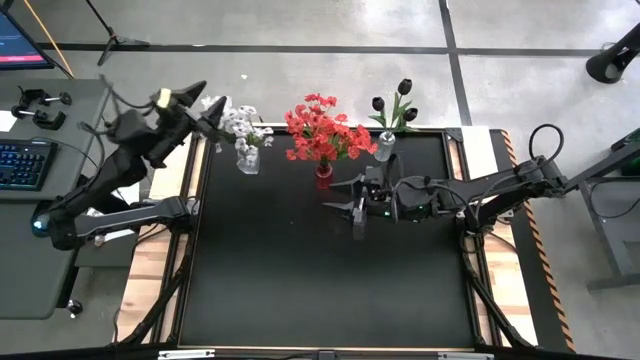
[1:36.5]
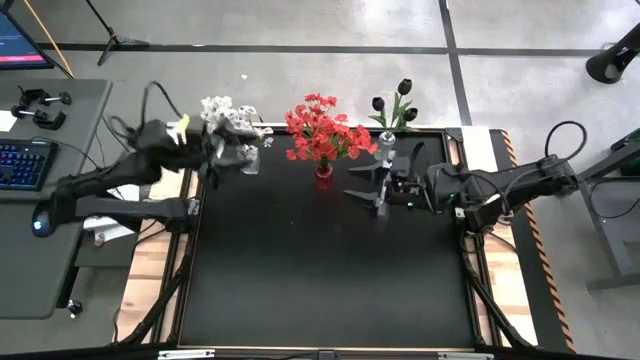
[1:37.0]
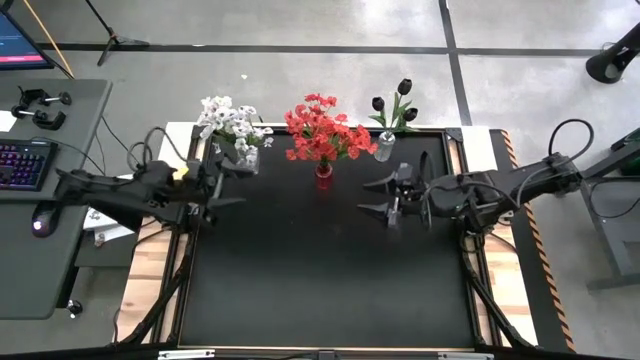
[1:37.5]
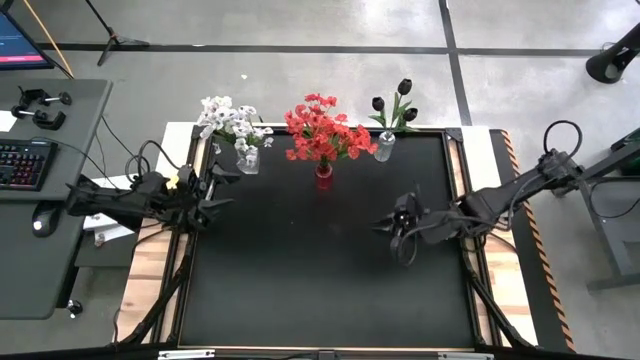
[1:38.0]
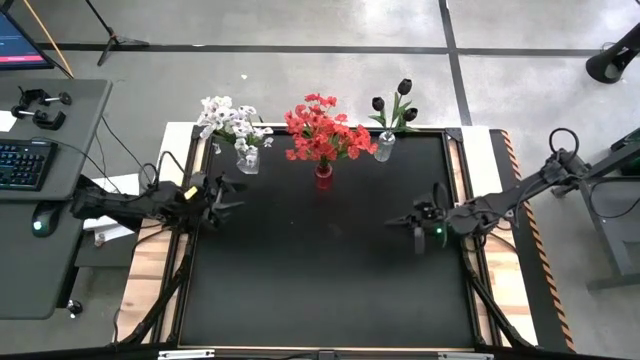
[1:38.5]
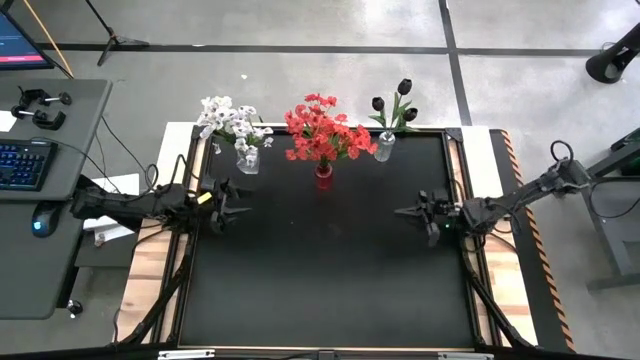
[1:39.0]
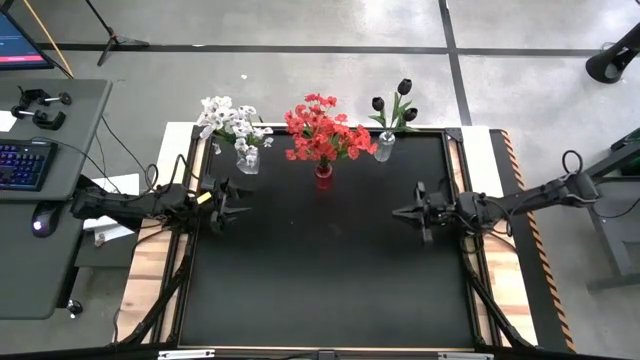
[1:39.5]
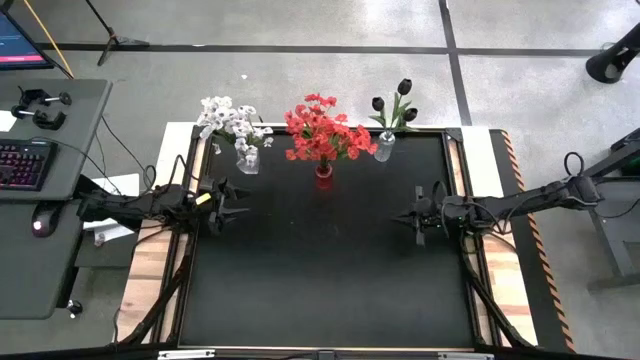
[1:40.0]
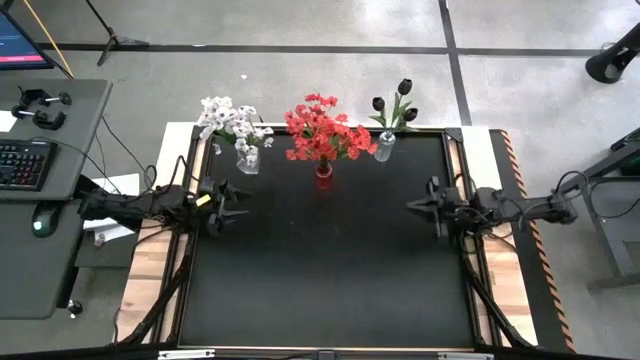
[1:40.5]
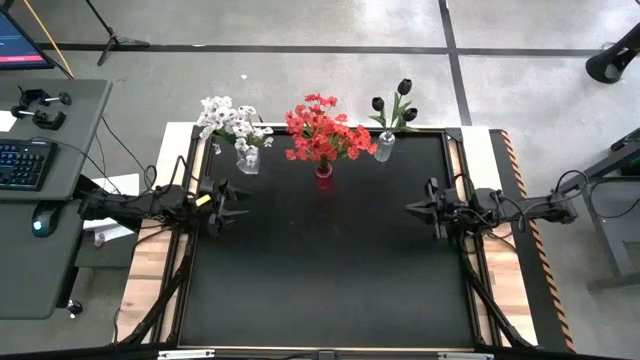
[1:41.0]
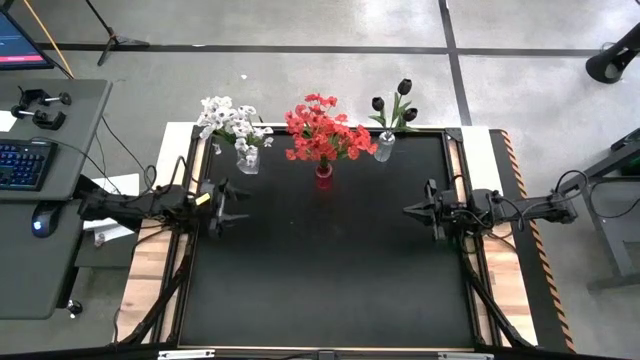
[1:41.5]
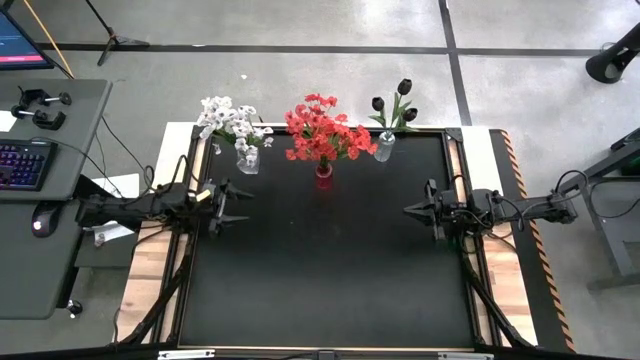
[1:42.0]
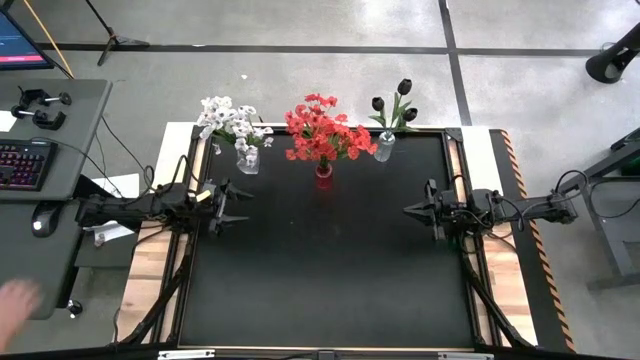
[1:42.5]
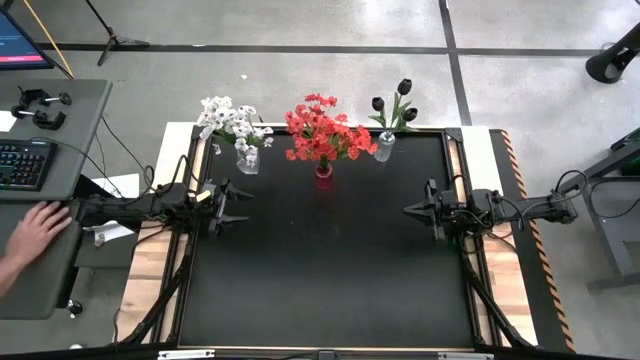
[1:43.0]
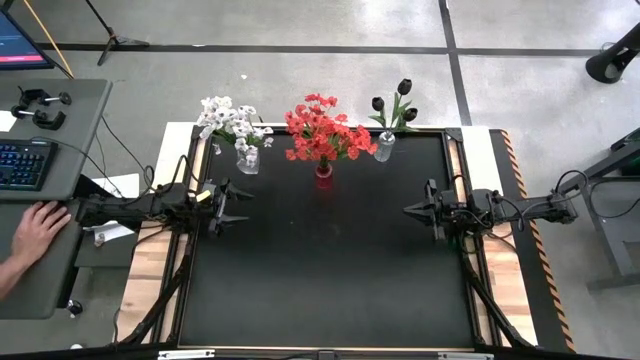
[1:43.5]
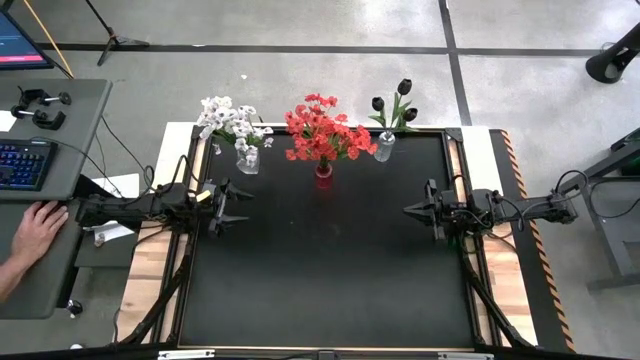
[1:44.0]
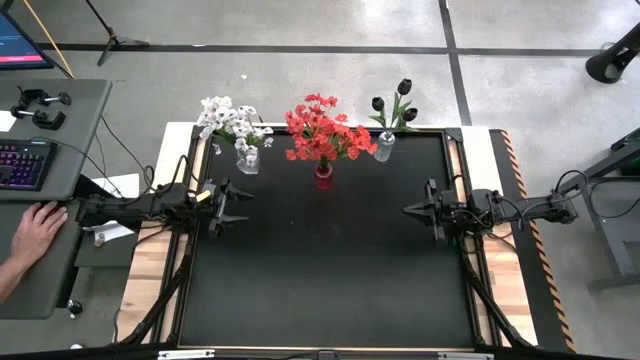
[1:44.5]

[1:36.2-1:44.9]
Task: Sort flowers into vase by color
Return to Home Position

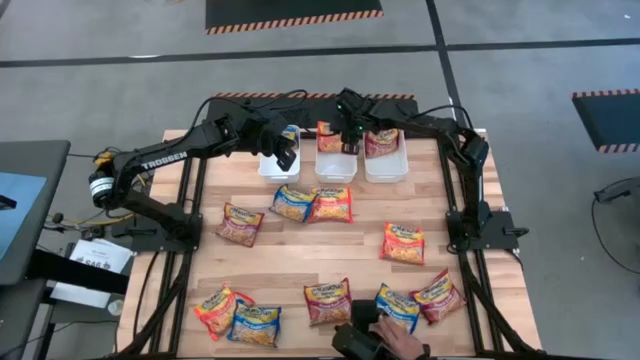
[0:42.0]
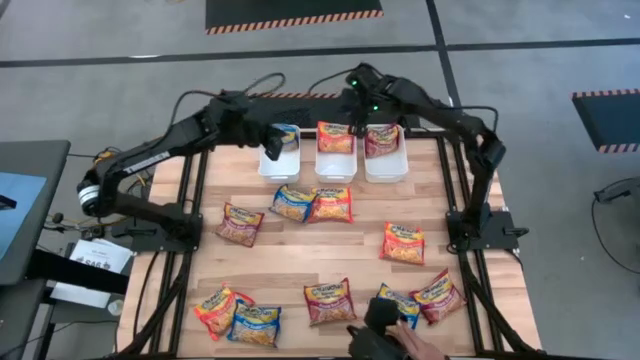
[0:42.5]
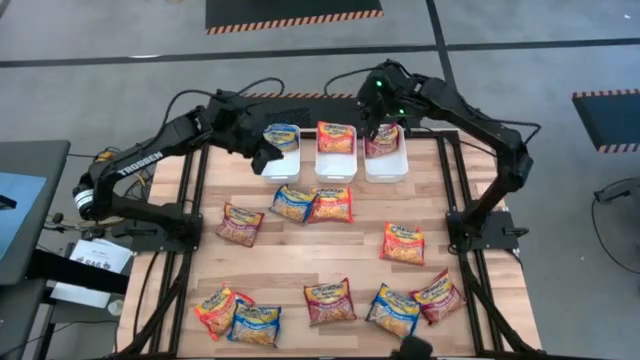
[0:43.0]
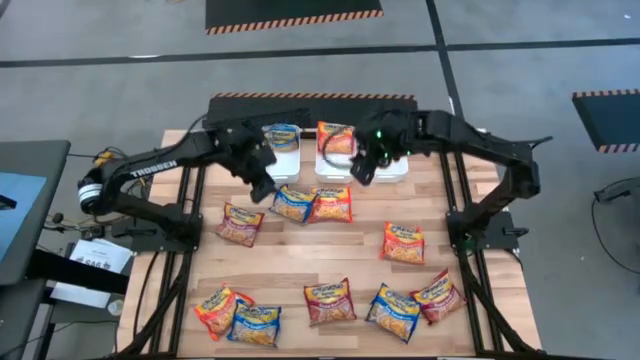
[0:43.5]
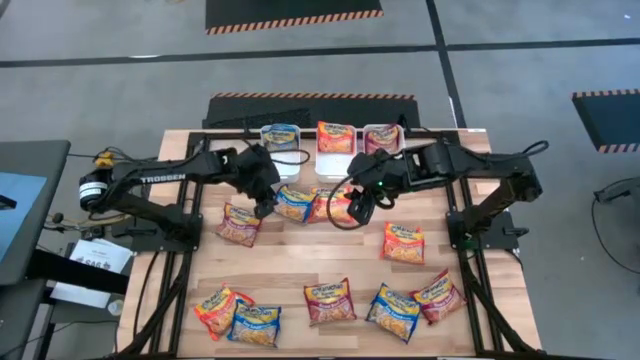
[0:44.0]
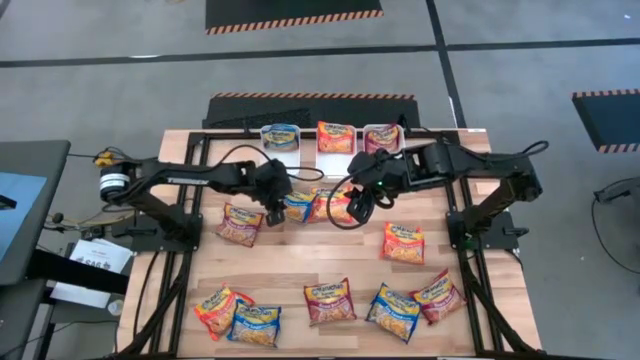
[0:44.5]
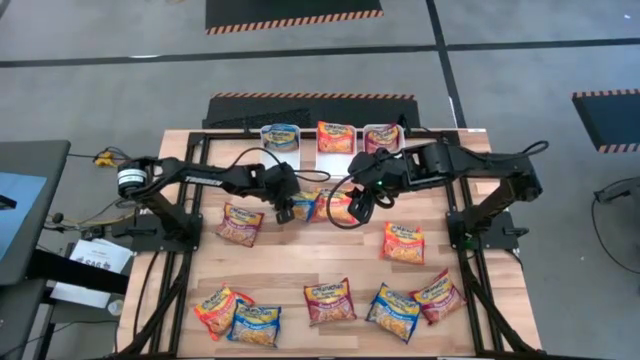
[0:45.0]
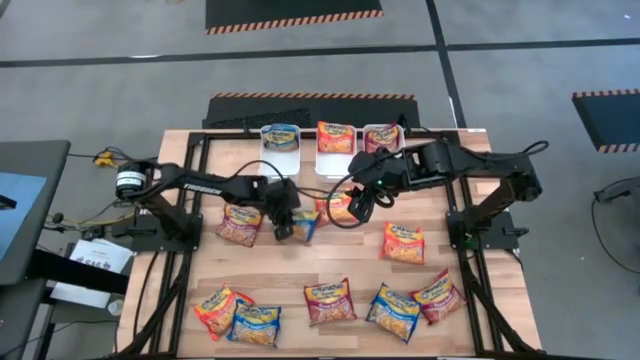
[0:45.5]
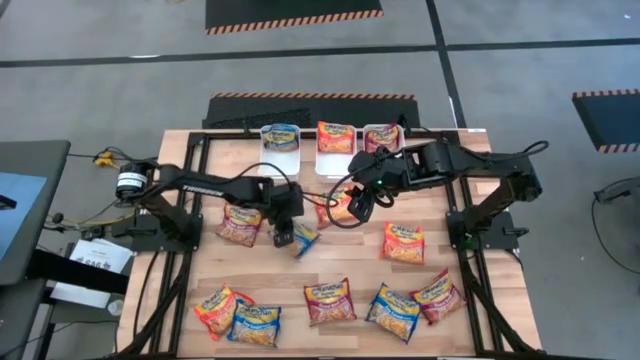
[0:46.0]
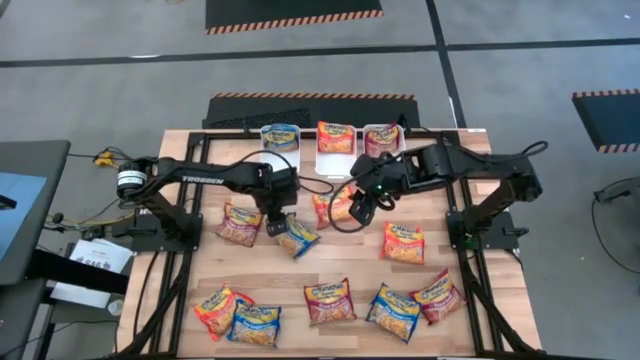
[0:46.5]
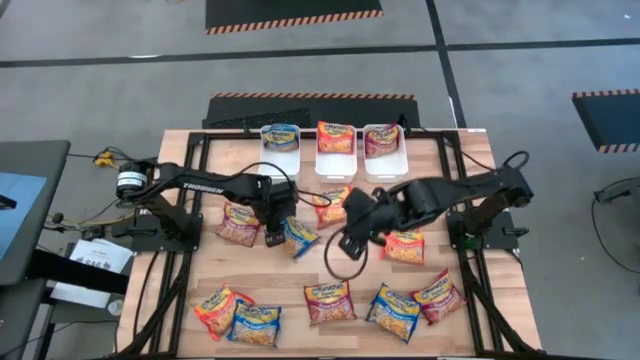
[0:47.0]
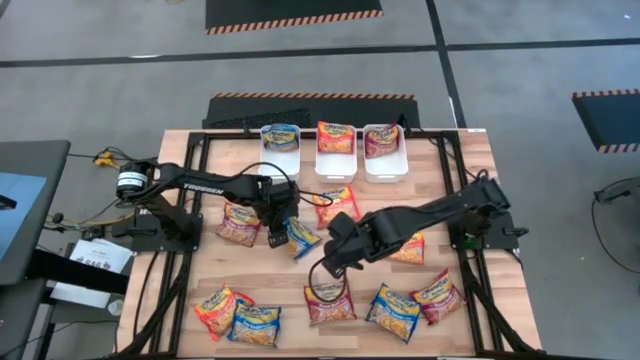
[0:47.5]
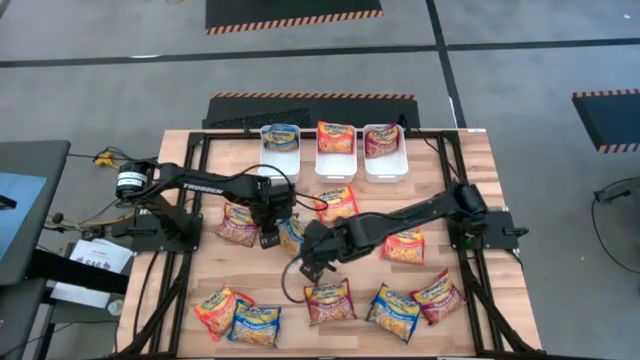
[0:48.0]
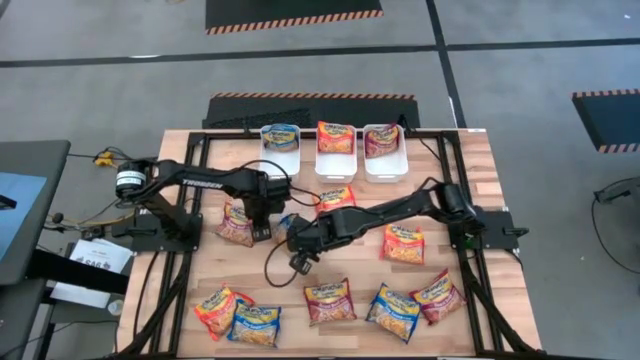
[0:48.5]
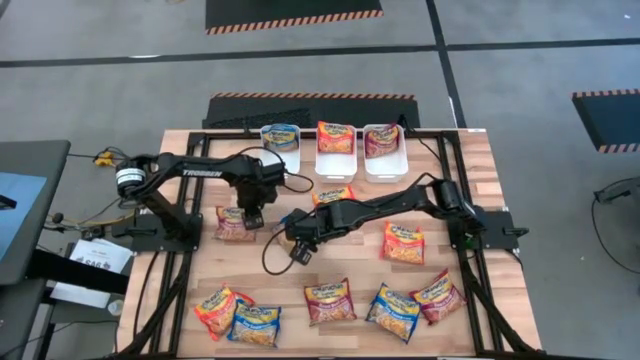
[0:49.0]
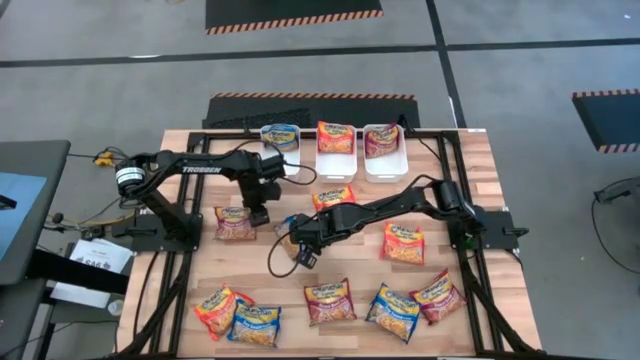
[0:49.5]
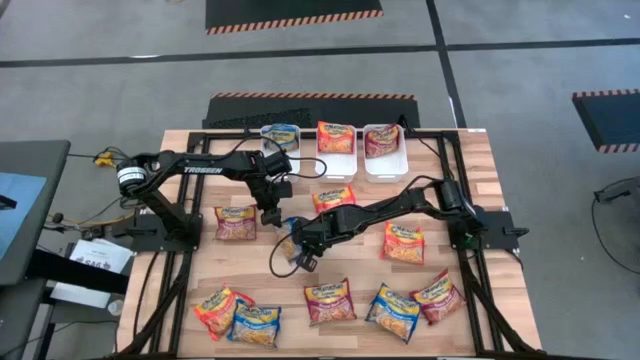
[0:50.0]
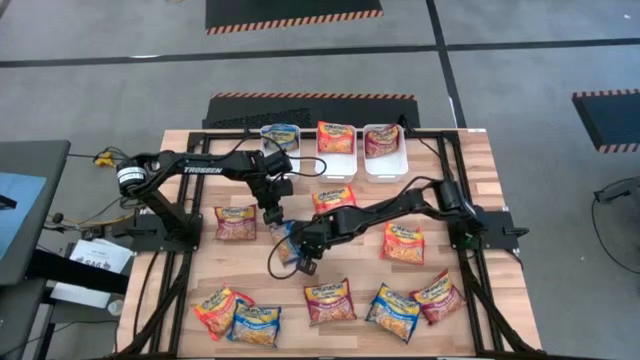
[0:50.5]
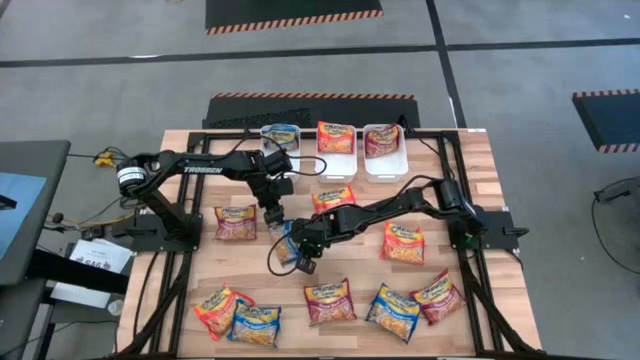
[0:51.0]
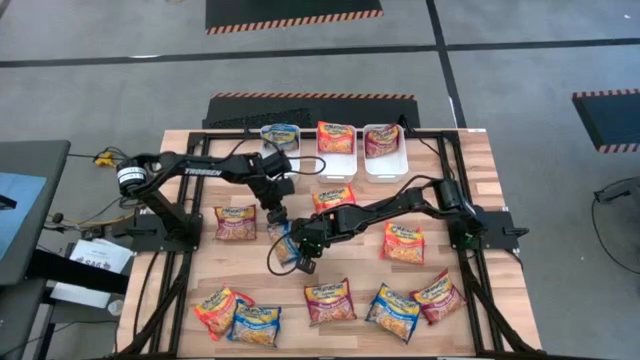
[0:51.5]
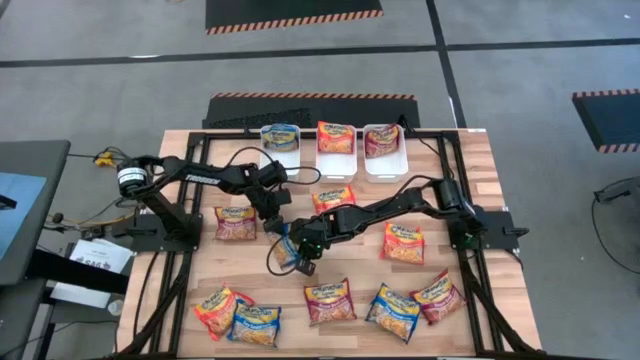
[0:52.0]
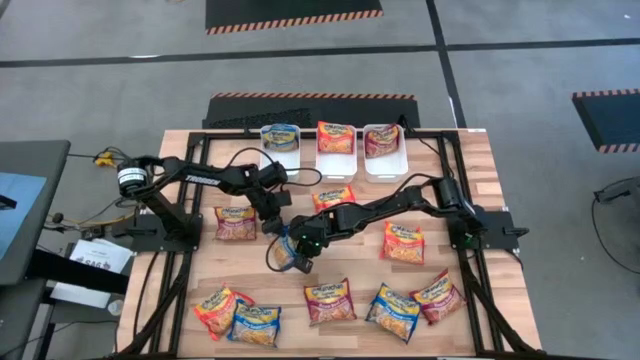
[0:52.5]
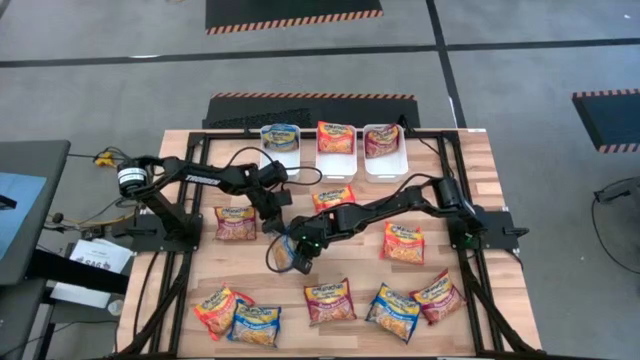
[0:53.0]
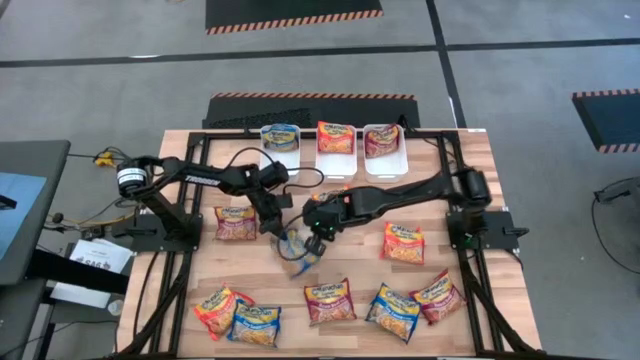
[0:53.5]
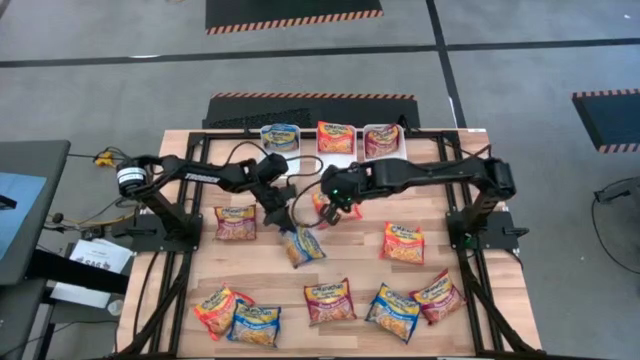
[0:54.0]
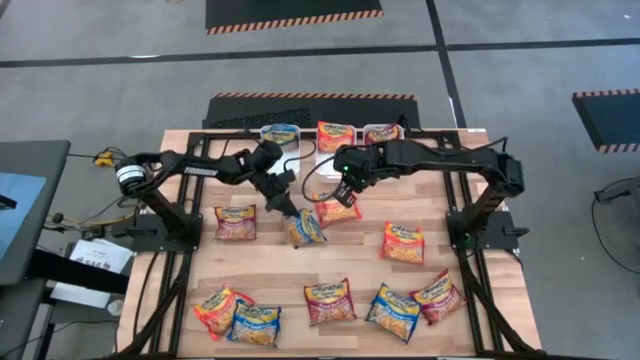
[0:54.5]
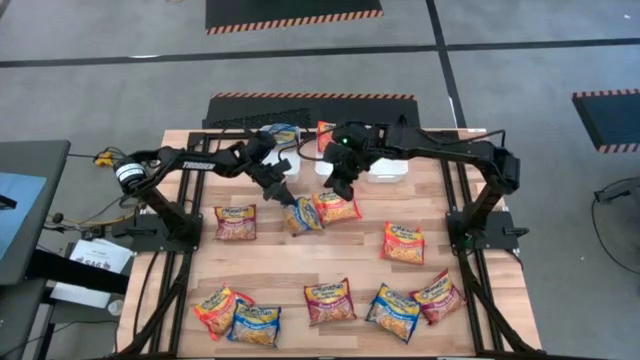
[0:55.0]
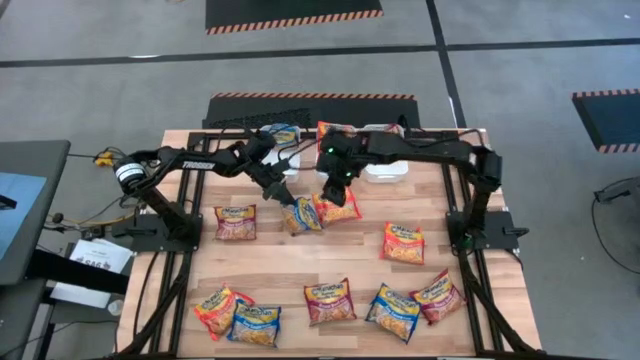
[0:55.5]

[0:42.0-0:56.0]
Task: Sort Maruchan noodles
Put the blue noodle pack into the left white bin
